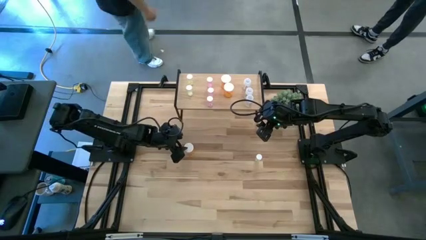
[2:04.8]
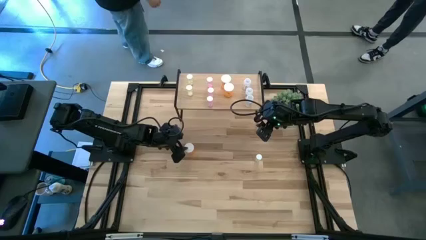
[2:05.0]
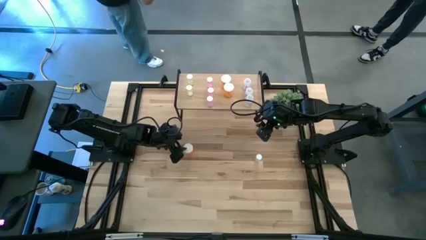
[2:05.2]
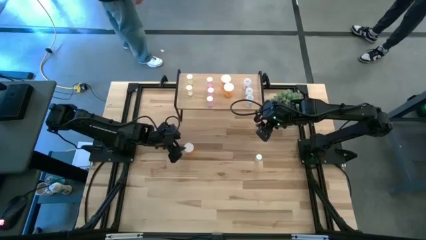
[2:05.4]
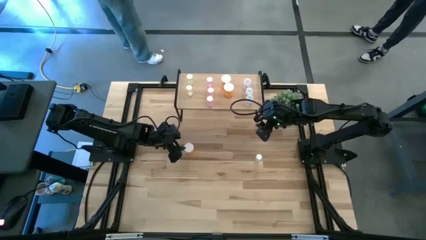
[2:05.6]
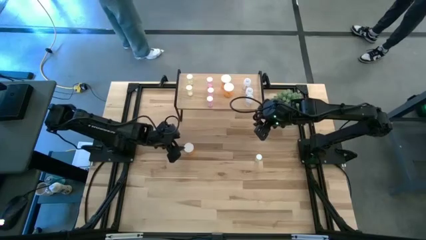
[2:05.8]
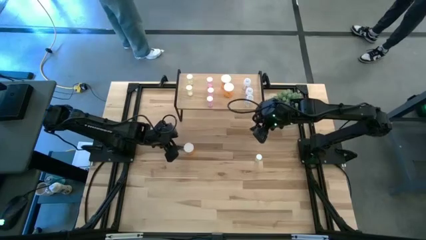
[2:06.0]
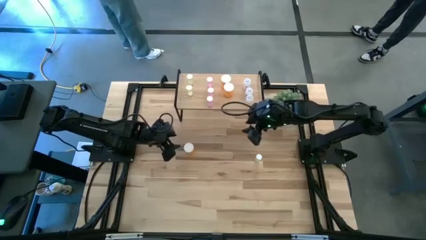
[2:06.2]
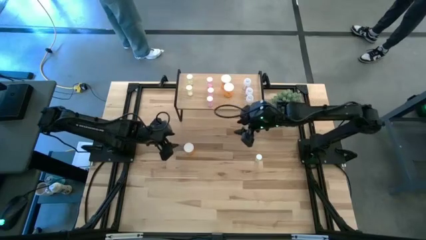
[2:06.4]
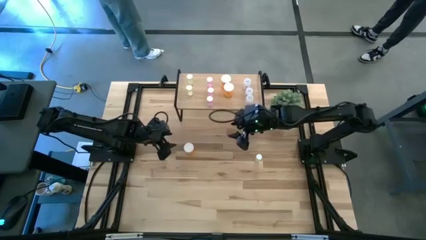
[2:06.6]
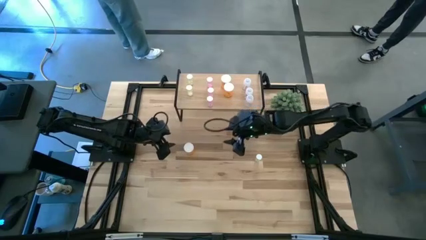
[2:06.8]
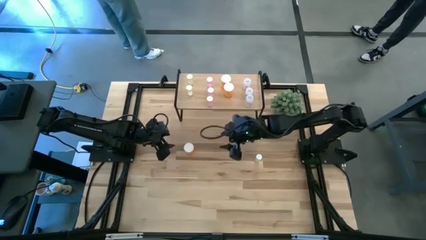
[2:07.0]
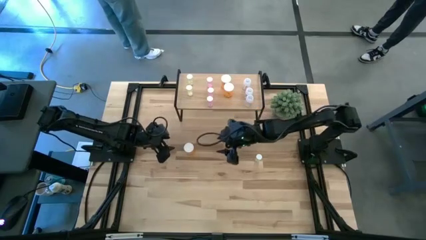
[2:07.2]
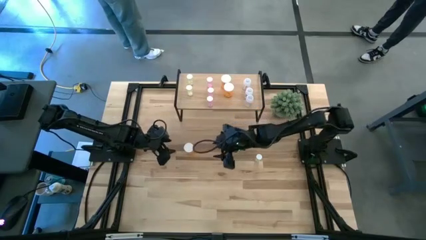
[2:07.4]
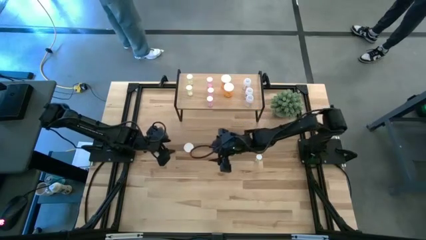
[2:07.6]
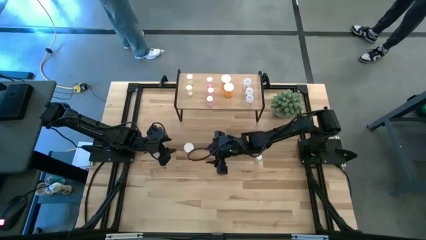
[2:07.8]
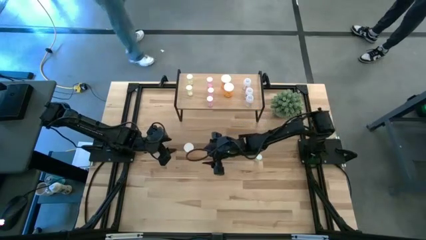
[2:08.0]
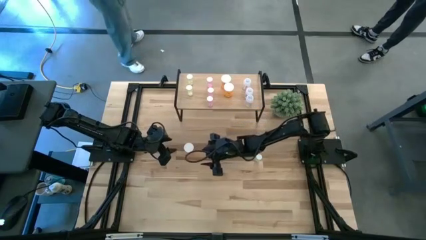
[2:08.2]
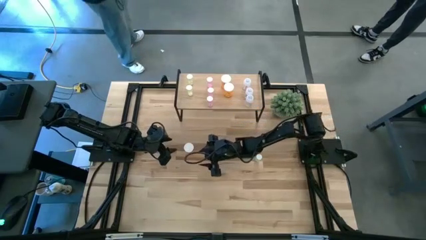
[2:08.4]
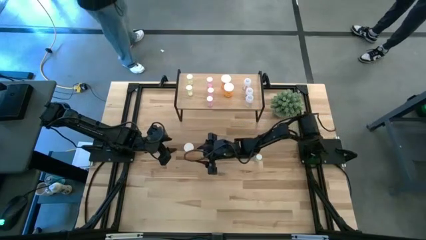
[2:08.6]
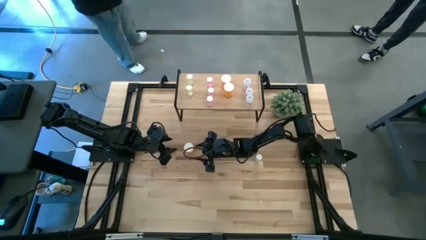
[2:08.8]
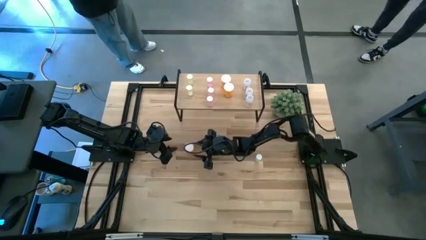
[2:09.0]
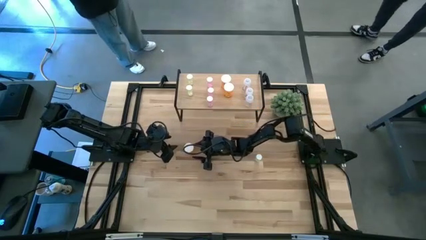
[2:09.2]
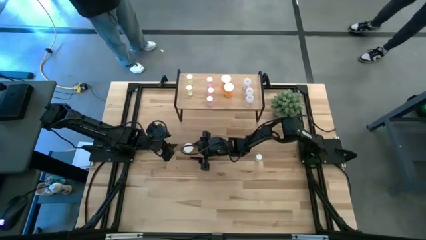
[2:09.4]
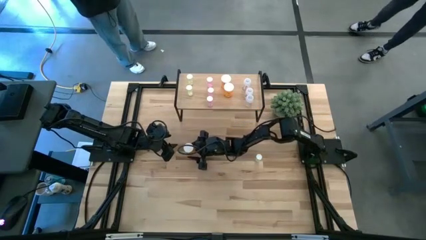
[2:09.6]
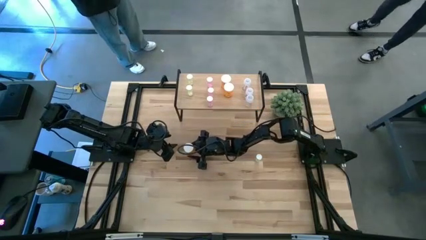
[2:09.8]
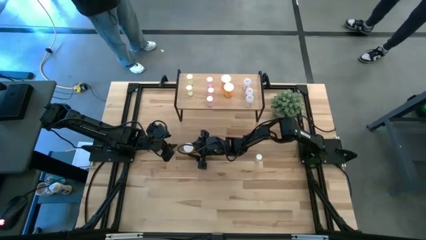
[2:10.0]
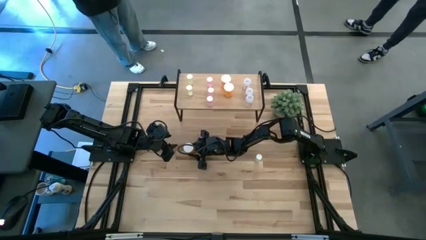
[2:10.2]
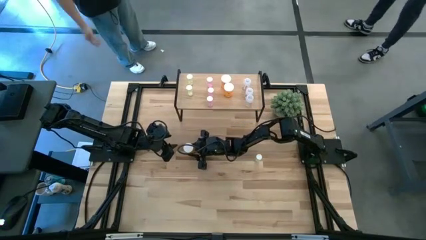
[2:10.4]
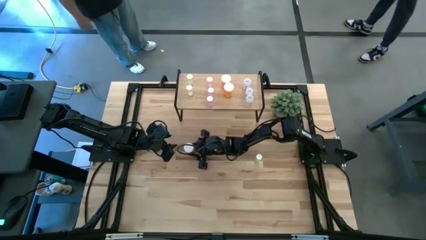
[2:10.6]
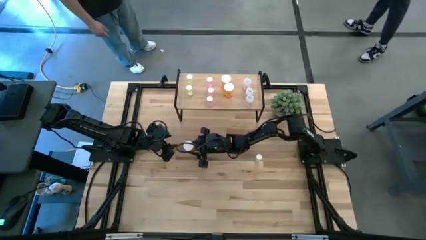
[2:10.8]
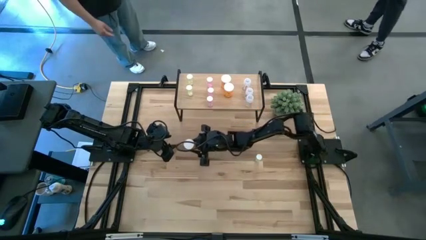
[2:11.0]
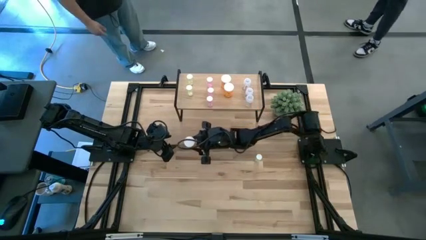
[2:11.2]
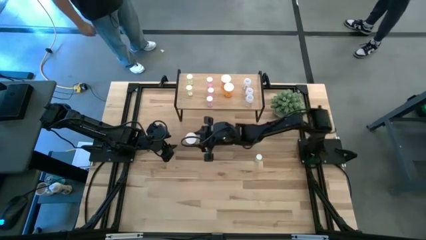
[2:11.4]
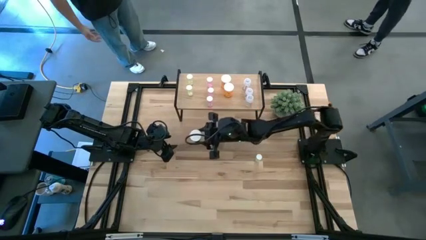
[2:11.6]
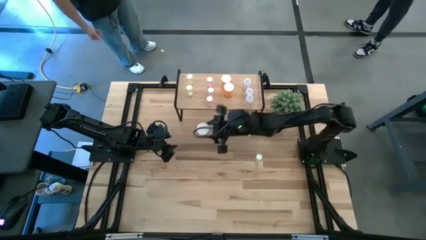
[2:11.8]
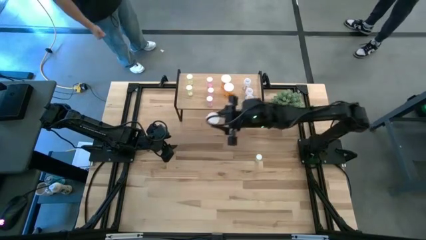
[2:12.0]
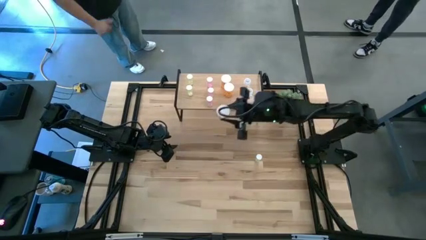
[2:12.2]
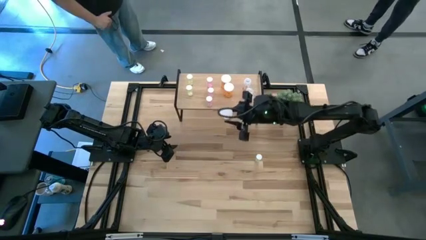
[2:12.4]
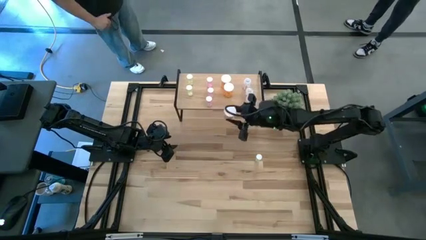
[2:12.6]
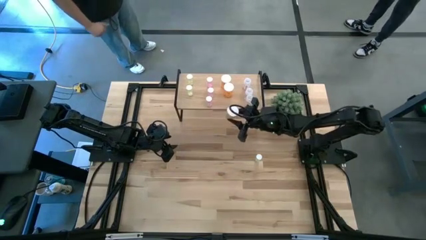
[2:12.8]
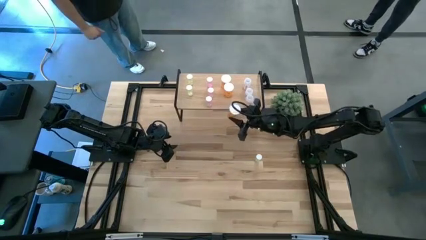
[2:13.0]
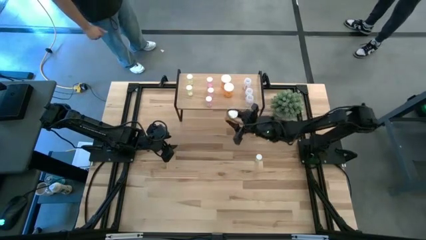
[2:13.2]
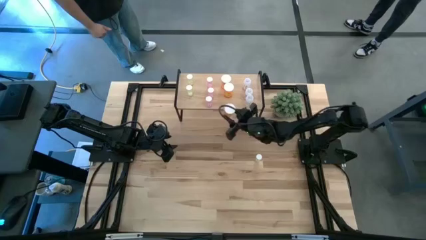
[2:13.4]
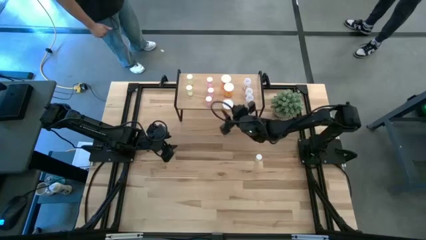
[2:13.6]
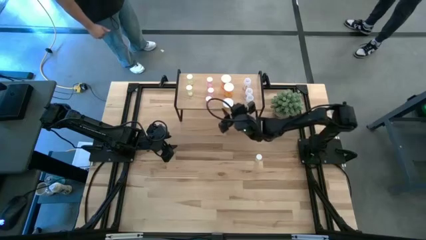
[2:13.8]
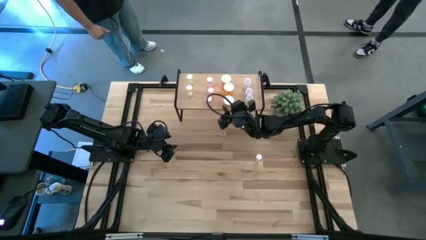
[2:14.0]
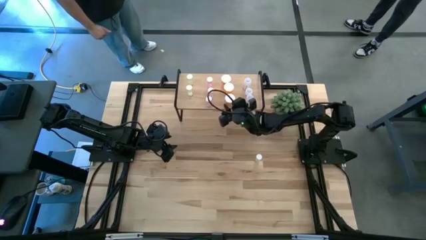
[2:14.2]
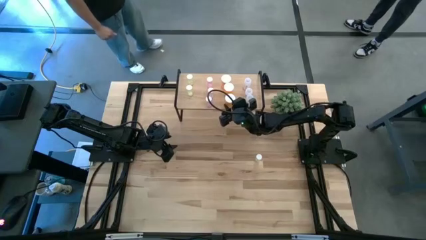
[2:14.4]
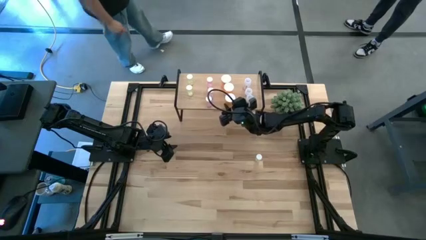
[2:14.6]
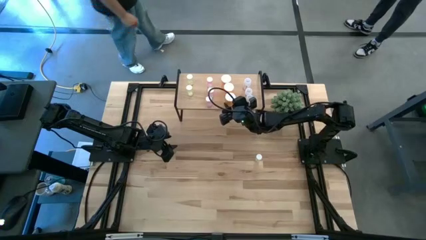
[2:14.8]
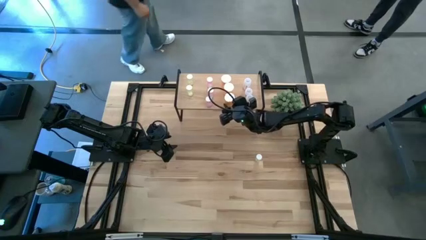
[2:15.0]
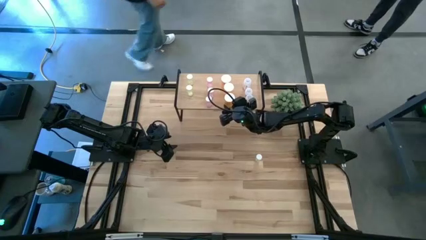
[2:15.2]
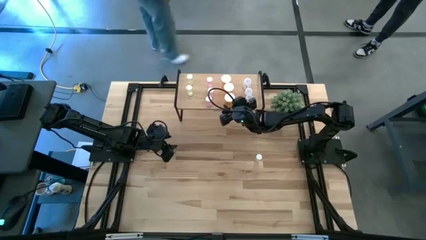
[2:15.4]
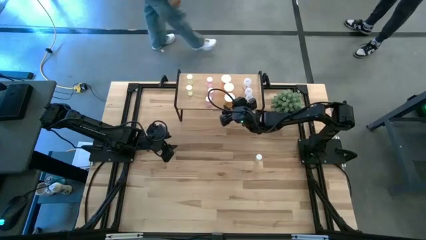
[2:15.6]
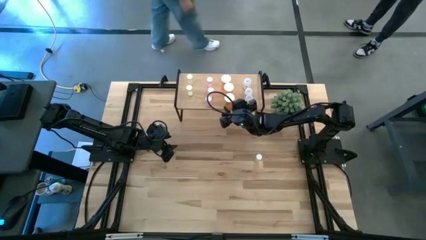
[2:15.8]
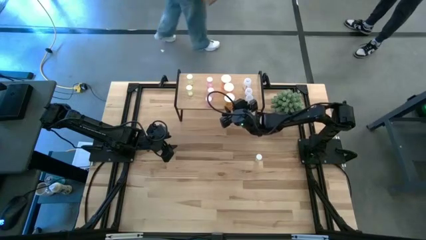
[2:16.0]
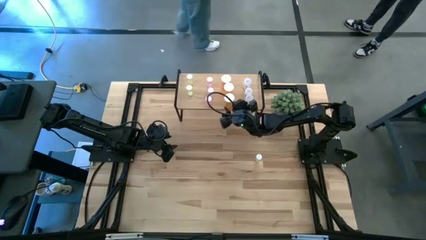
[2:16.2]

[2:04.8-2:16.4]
Task: Pick and place medicine bottles onto shelf by color
Put the orange pill bottle aligned with the other orange pill bottles on the shelf

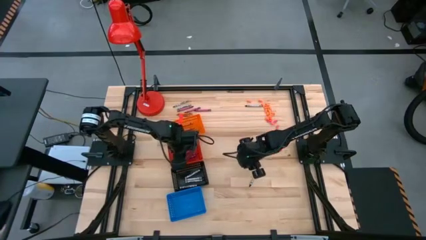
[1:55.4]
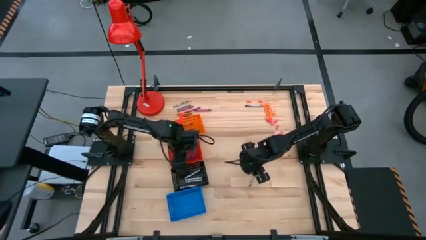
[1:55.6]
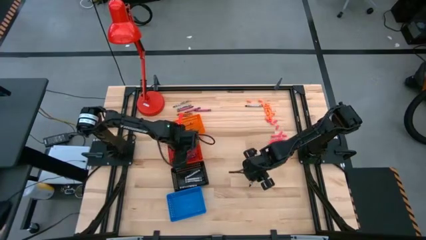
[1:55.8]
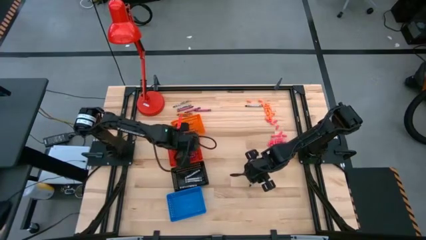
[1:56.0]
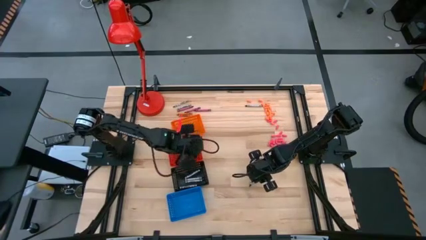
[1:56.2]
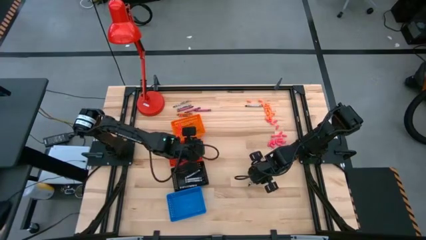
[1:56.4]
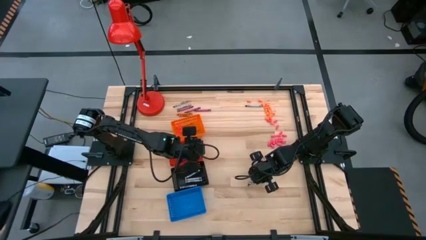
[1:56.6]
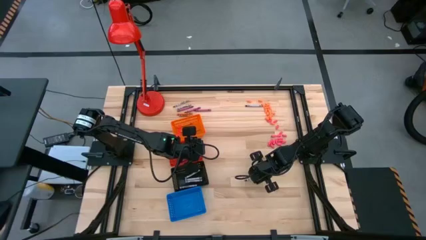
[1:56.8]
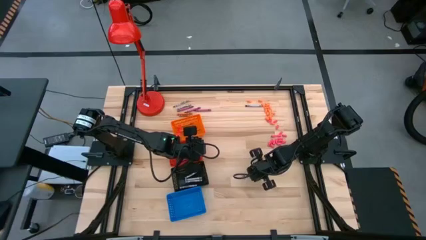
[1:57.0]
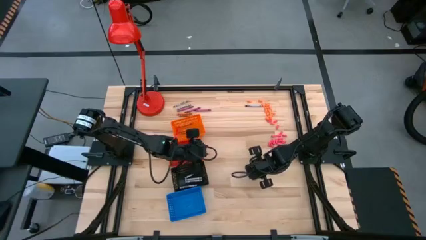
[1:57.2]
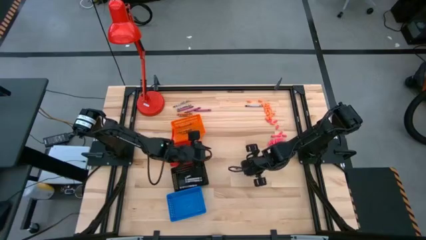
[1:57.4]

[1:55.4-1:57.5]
Task: Sort crayons
Put the black crayon into the black basket
